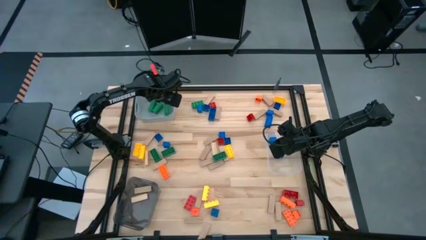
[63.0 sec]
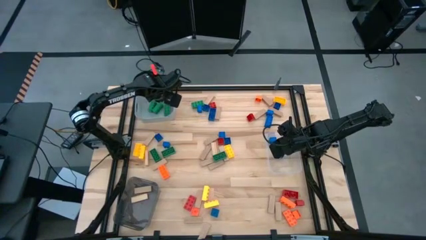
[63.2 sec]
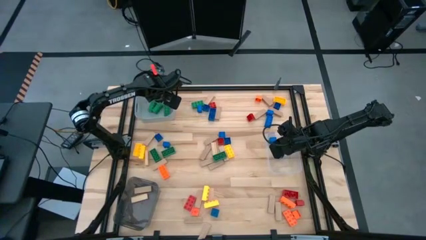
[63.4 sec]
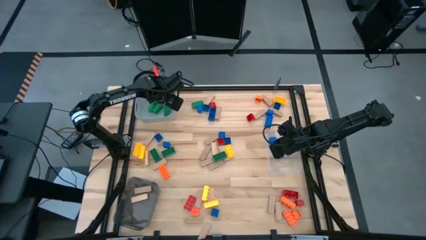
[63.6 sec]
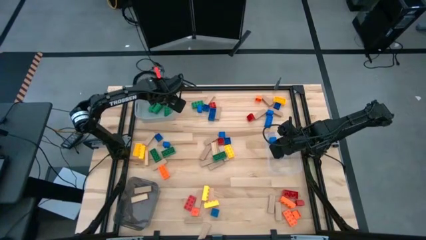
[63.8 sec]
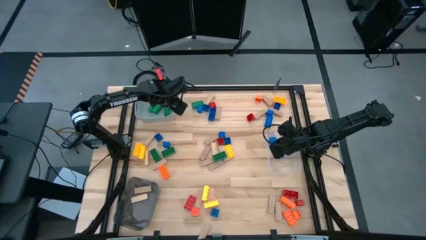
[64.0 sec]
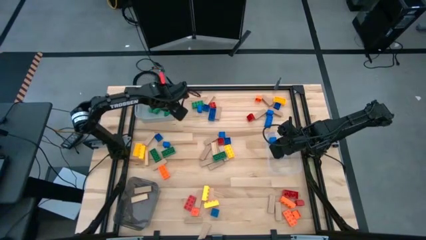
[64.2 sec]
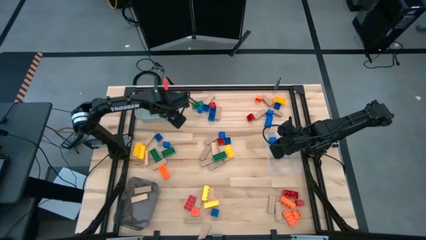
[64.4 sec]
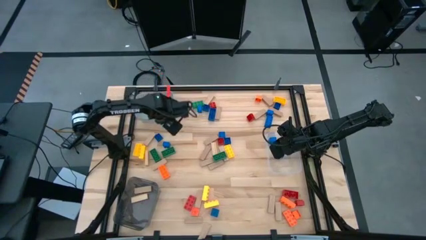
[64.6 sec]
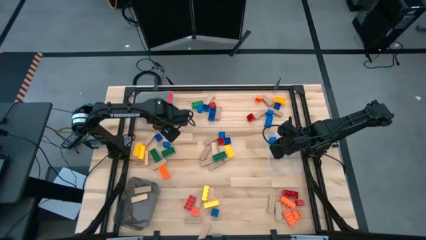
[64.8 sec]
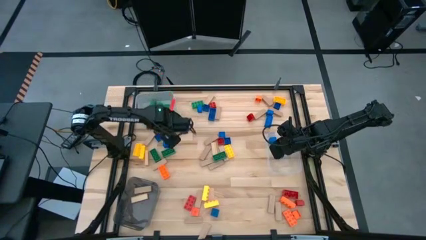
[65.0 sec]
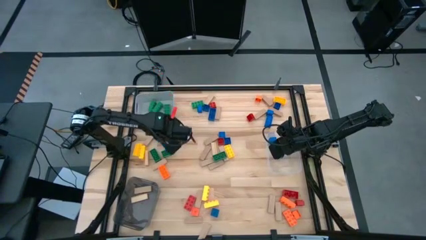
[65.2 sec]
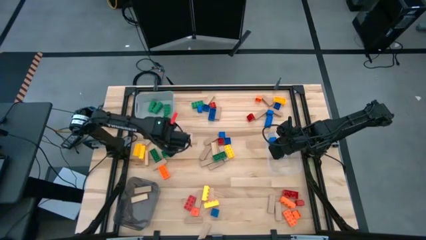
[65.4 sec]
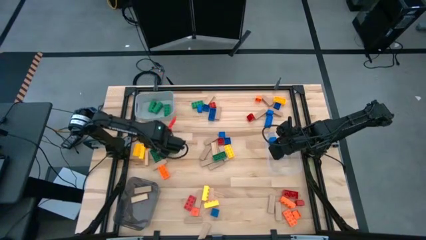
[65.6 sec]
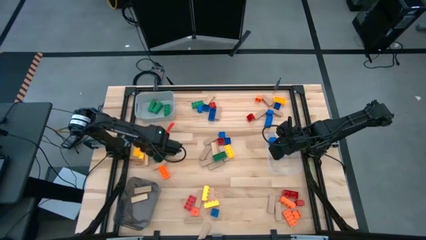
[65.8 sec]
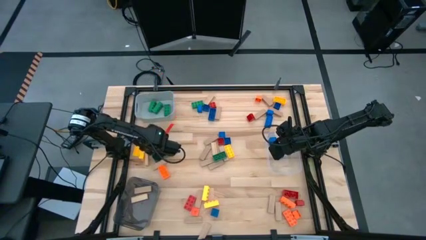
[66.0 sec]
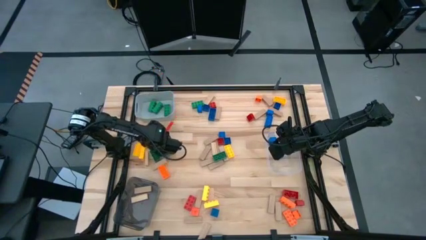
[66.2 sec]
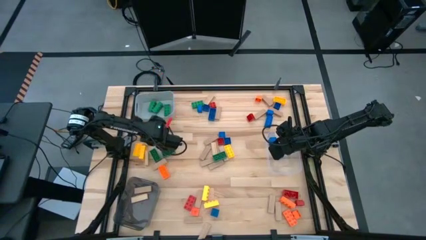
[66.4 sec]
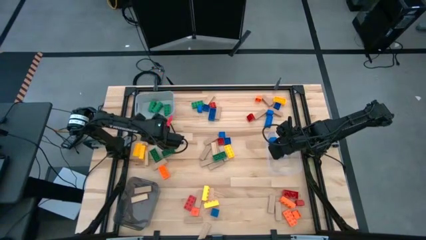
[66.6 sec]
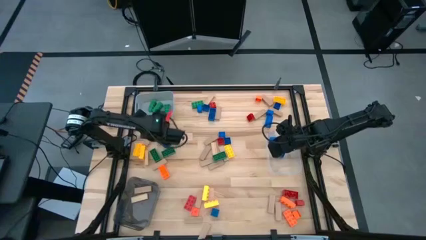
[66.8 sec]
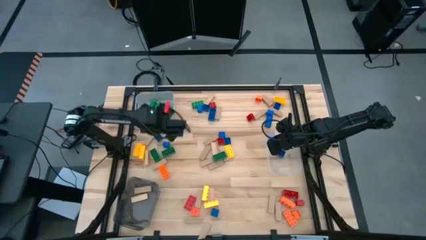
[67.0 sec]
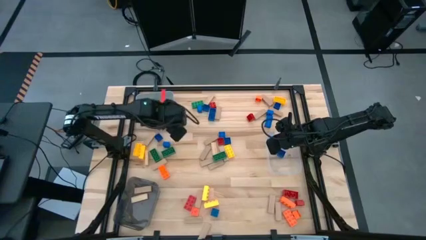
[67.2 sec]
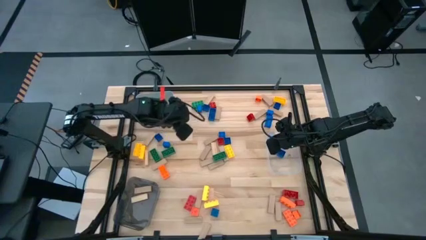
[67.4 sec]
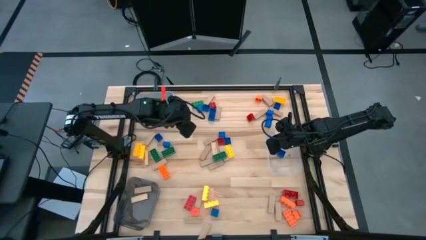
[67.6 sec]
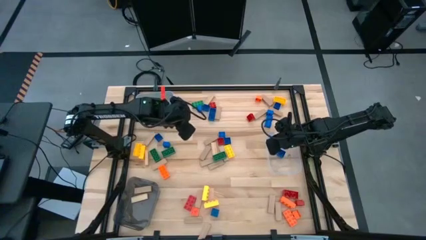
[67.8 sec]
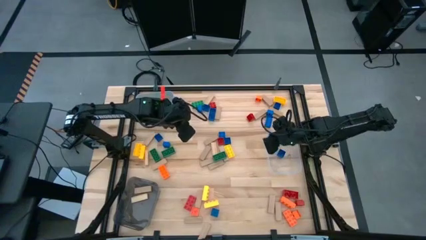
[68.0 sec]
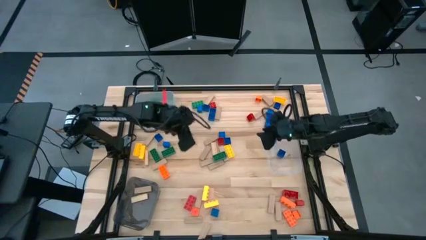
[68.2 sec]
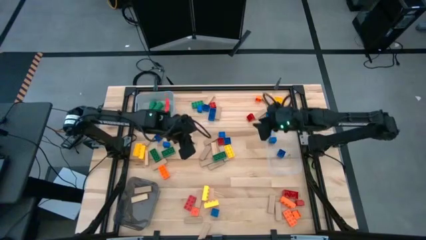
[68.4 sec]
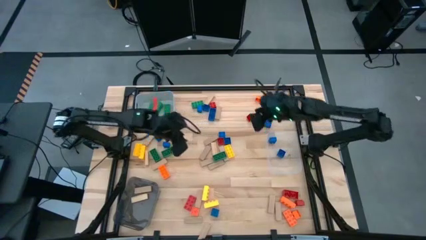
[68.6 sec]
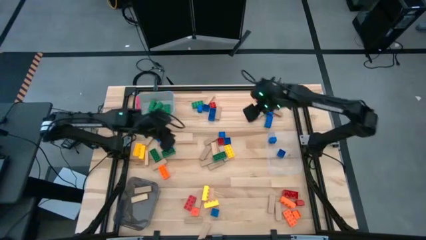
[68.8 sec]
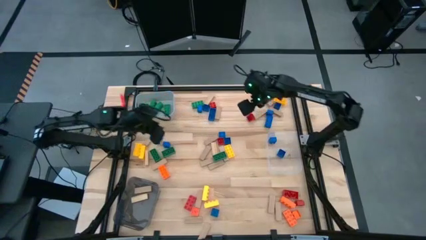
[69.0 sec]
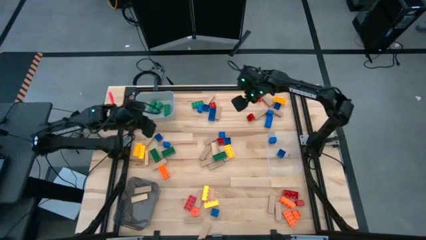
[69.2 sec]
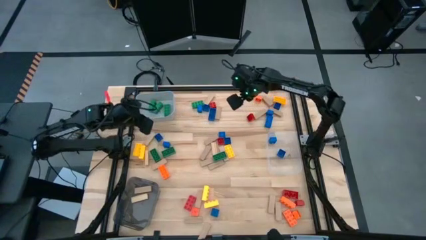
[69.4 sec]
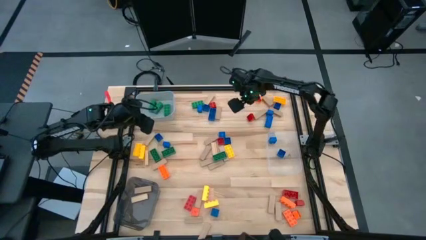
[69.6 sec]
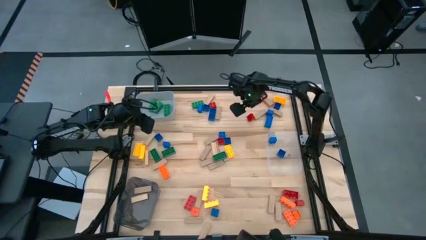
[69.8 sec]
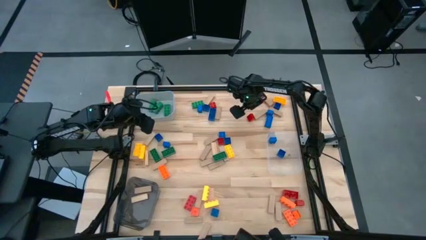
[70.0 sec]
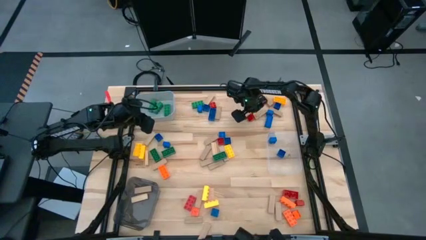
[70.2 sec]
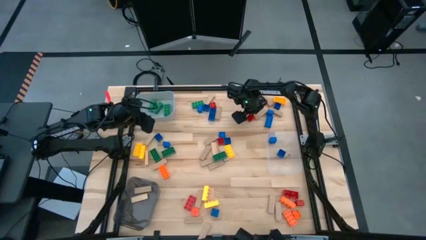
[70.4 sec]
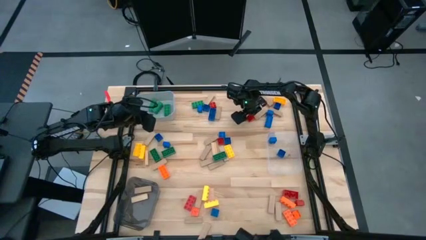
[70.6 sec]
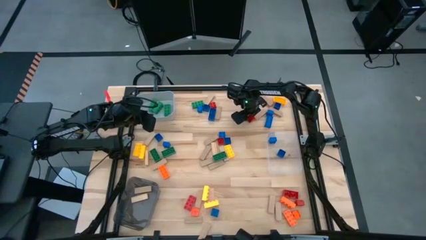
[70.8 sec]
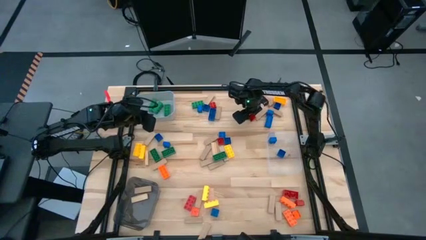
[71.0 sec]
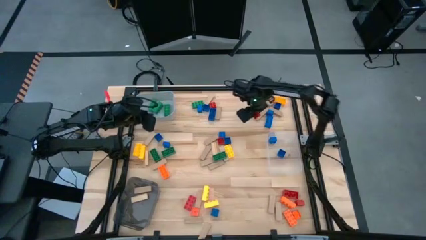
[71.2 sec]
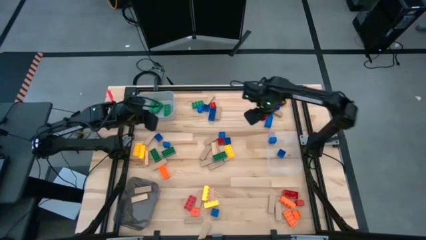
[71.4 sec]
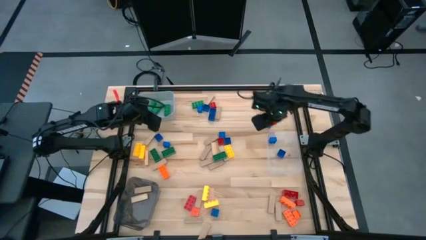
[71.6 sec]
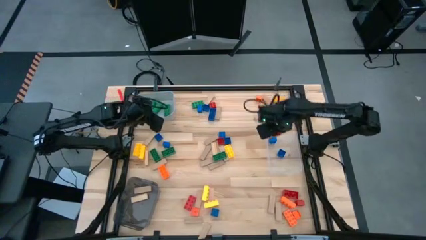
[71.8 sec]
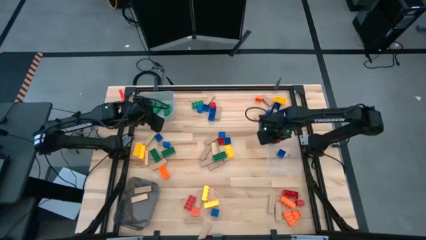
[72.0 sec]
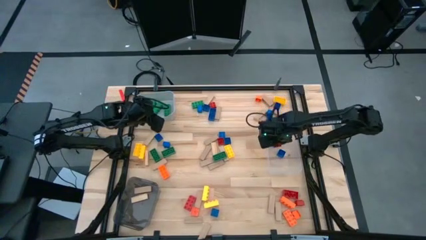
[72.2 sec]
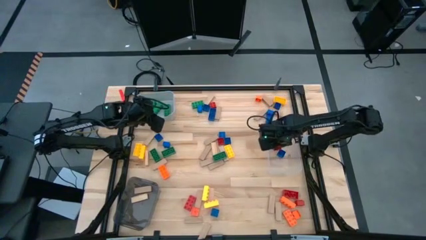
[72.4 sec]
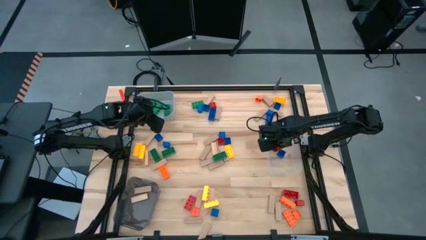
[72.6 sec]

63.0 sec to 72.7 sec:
Task: Sort blocks by size
Put the small red game piece into the transparent bin

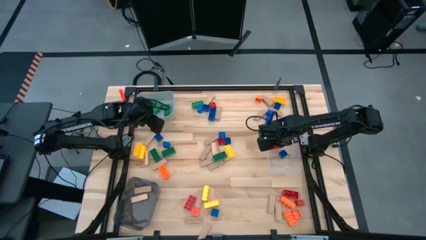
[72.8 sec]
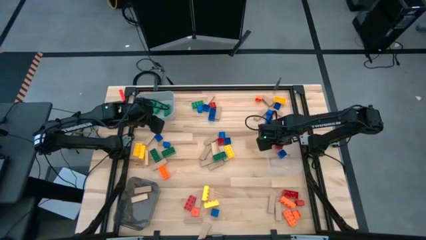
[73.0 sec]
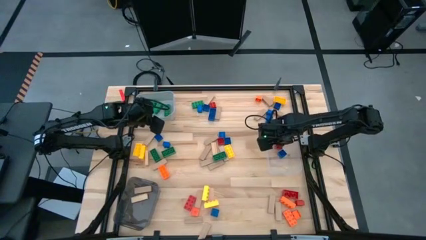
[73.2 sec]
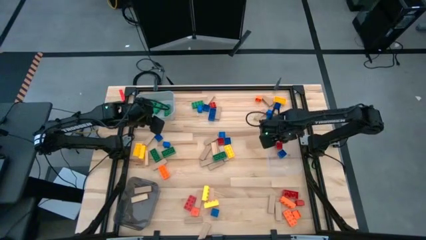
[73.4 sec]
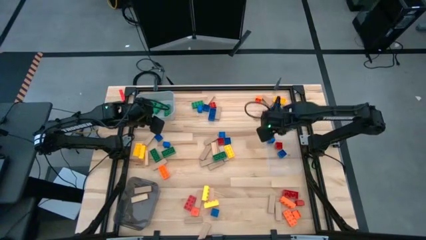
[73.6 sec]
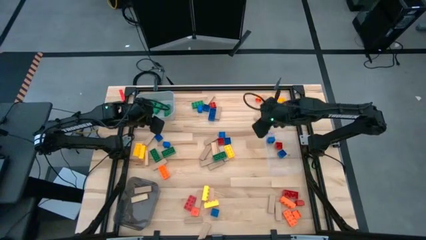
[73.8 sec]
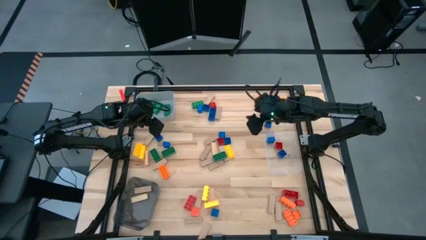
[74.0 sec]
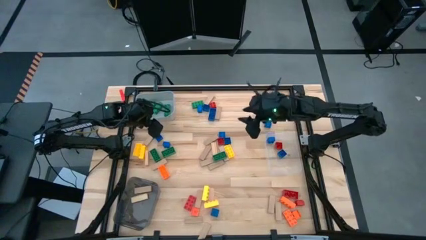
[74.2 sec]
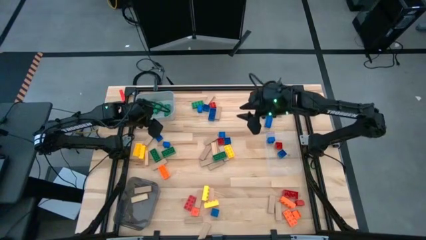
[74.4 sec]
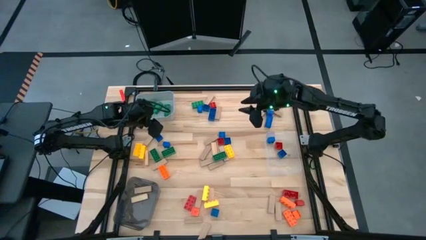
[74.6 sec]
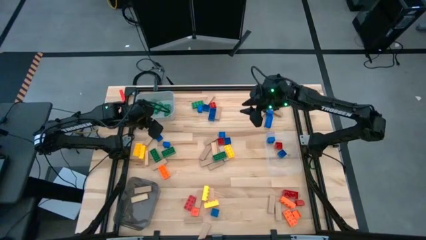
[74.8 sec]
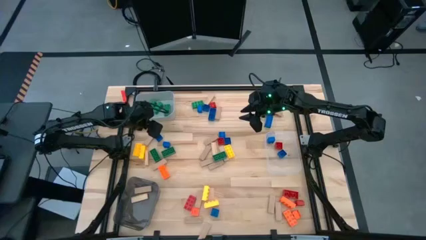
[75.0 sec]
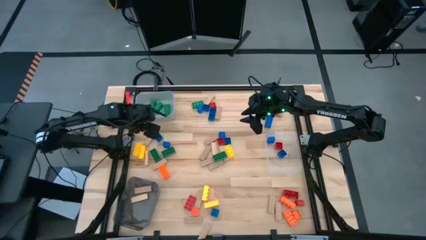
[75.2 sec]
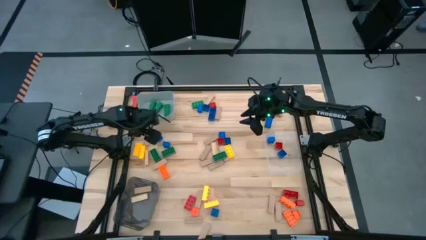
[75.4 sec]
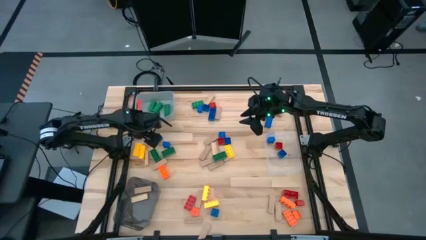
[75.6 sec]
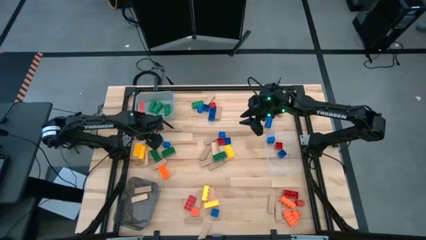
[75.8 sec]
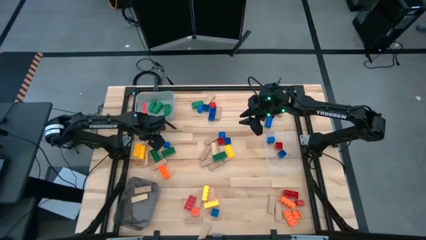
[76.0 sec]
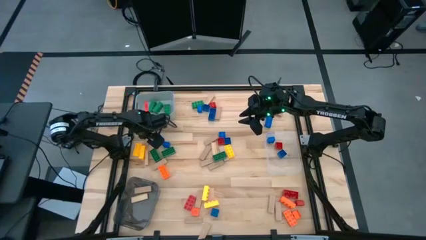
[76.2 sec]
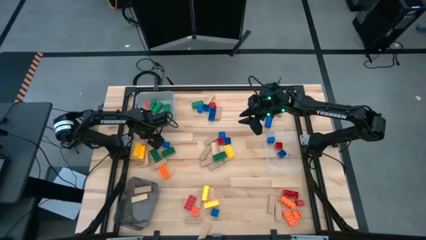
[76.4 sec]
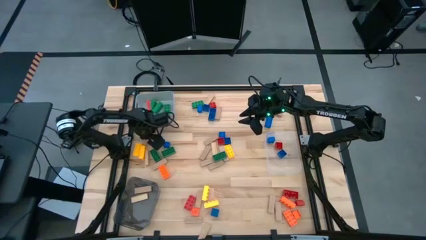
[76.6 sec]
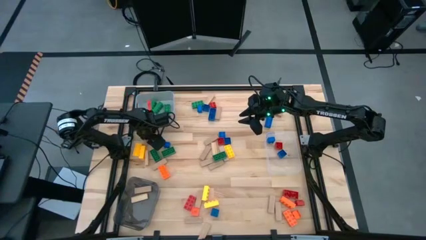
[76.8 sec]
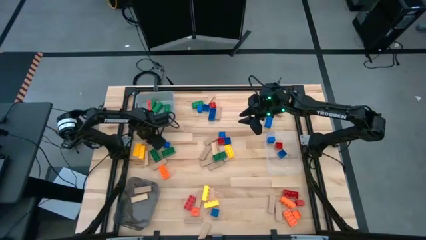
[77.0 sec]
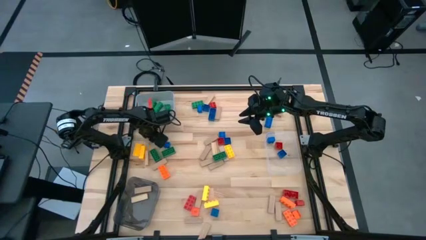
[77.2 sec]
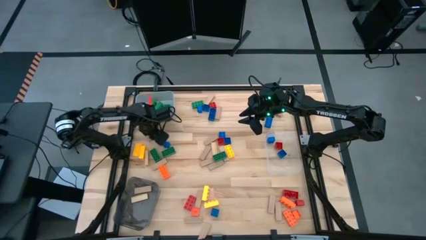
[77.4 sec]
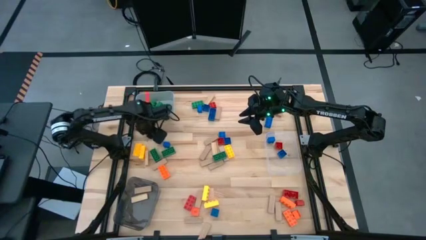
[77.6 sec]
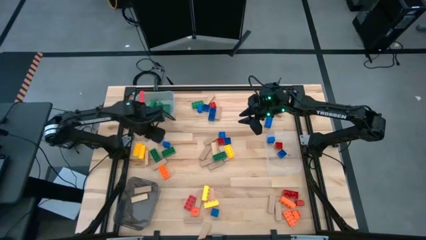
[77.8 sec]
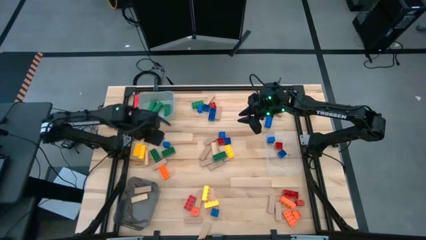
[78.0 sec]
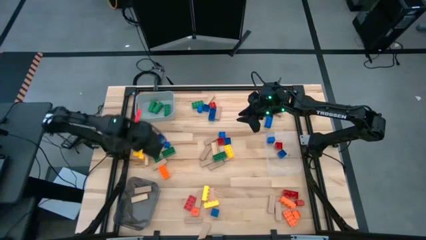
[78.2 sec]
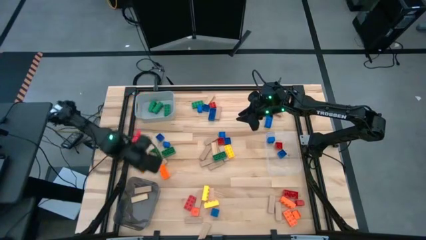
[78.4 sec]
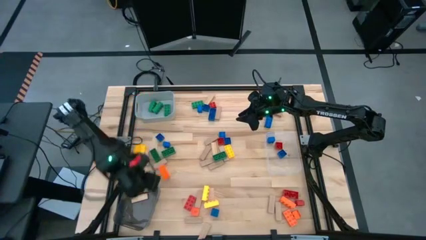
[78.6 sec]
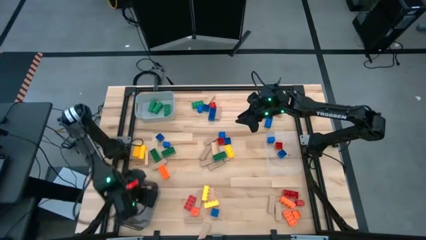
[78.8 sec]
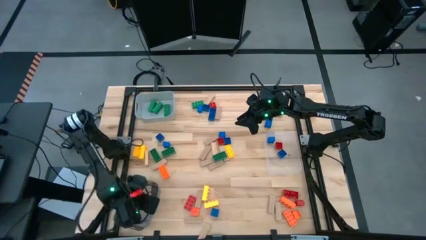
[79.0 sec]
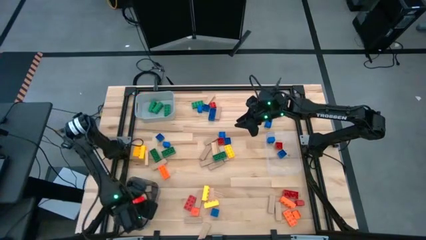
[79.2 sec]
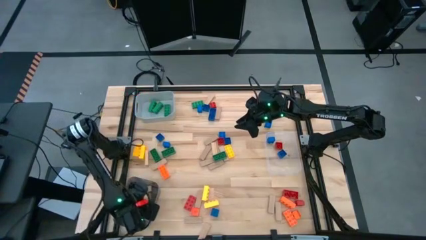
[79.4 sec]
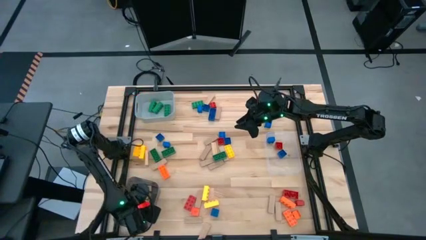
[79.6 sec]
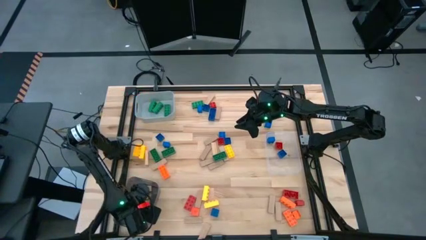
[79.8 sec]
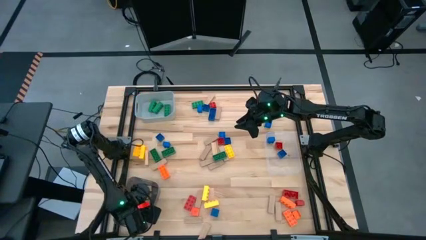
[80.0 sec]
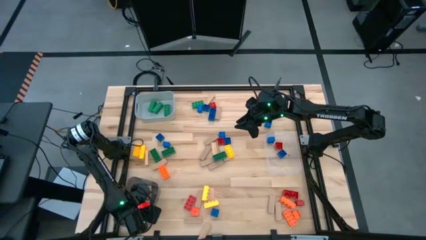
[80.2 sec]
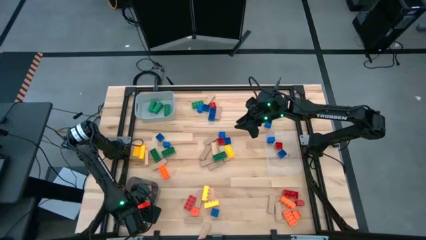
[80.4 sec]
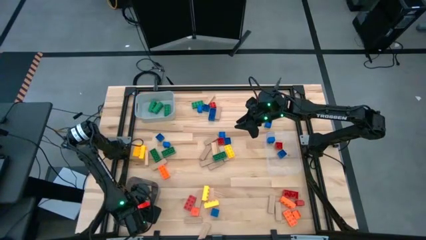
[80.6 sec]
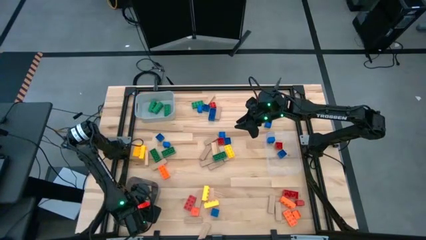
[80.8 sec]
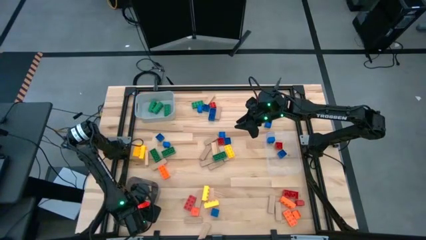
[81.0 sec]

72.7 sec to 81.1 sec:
Put the brown block into the black bin
